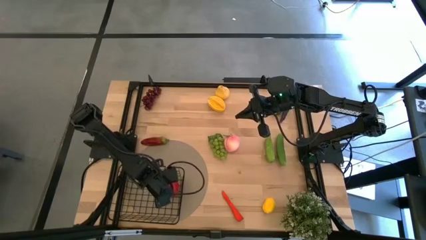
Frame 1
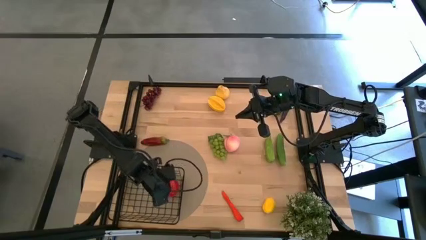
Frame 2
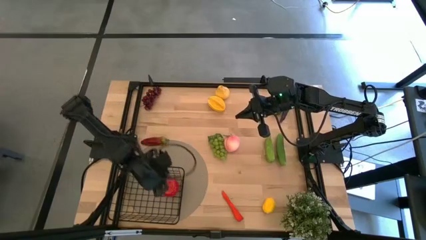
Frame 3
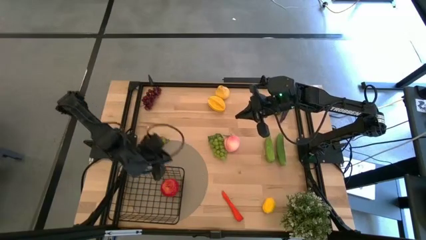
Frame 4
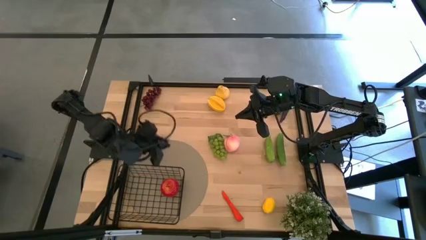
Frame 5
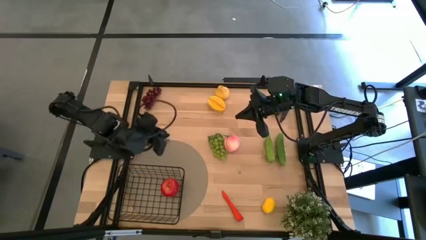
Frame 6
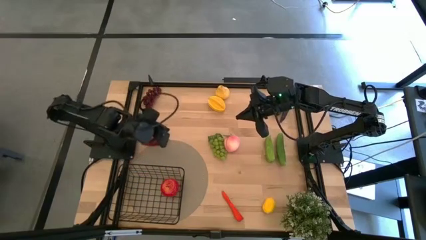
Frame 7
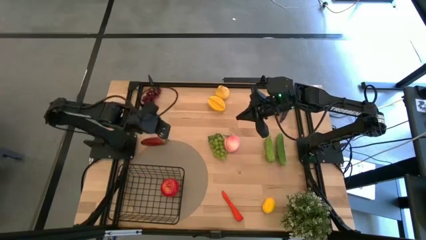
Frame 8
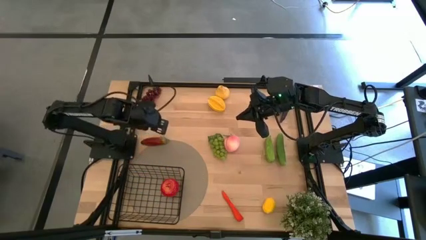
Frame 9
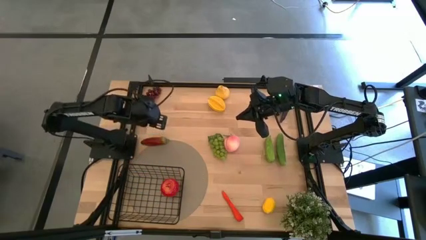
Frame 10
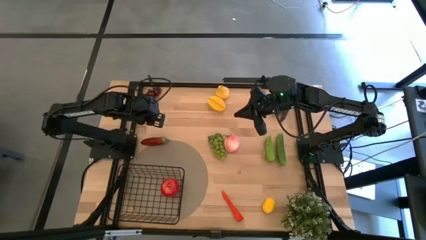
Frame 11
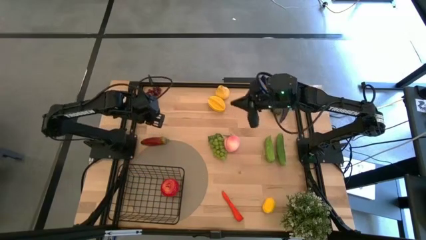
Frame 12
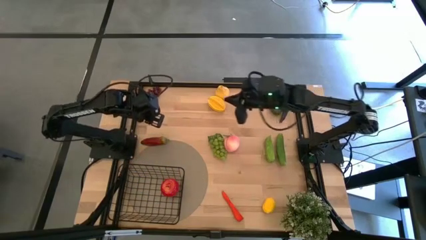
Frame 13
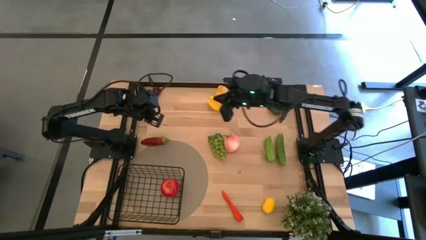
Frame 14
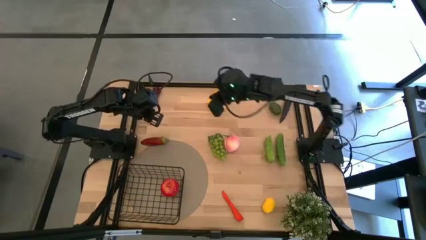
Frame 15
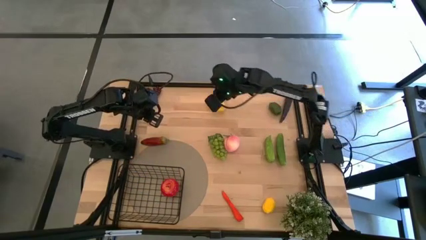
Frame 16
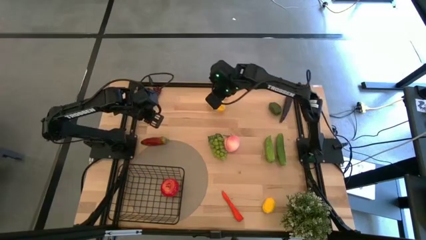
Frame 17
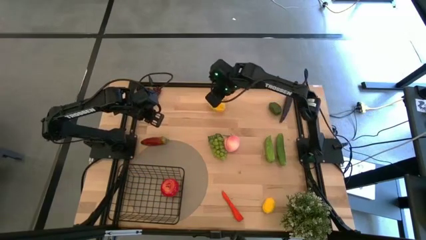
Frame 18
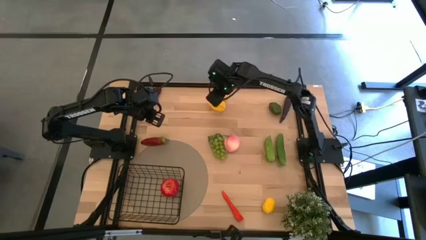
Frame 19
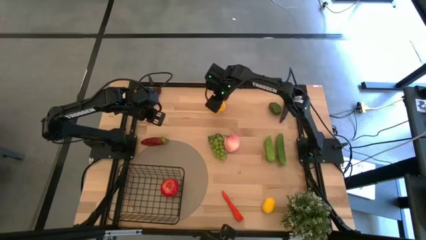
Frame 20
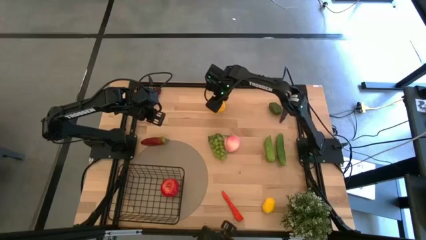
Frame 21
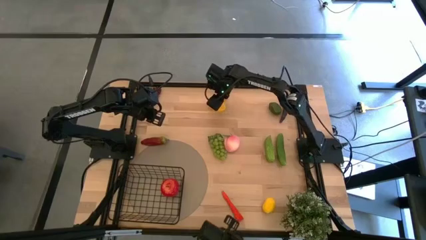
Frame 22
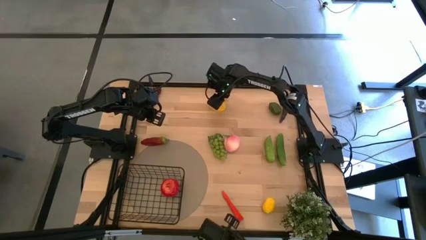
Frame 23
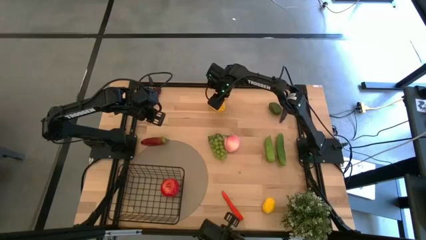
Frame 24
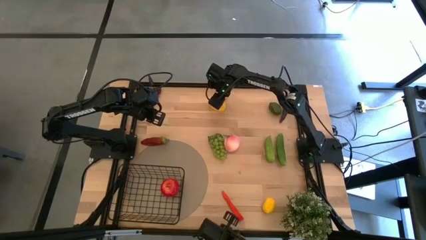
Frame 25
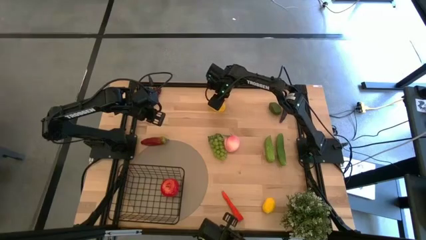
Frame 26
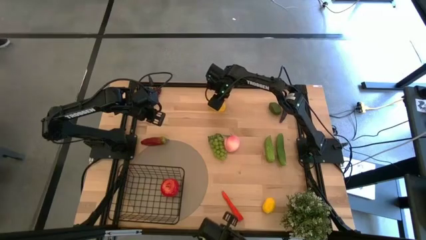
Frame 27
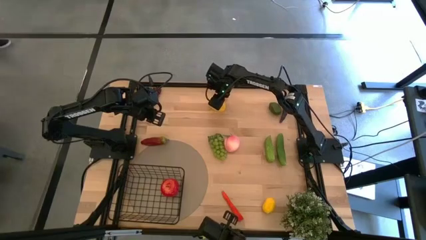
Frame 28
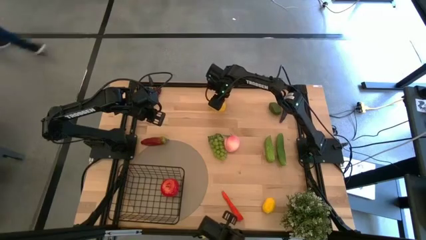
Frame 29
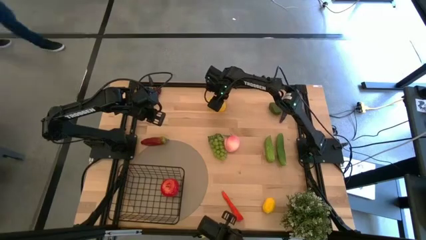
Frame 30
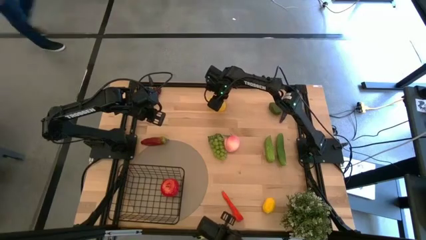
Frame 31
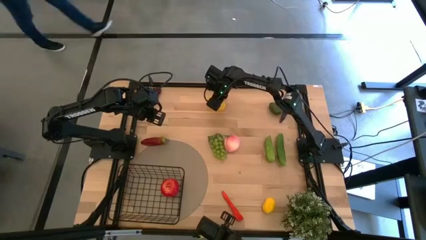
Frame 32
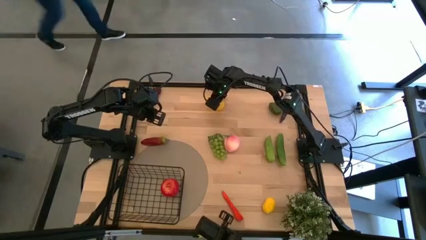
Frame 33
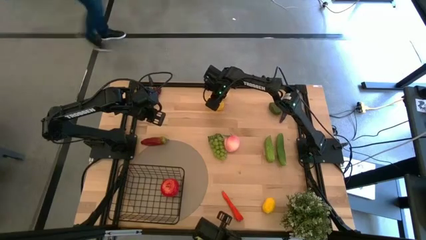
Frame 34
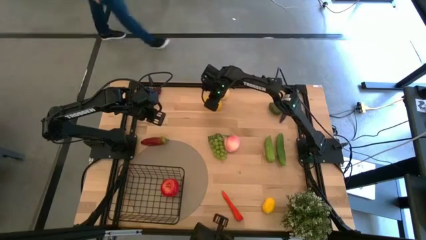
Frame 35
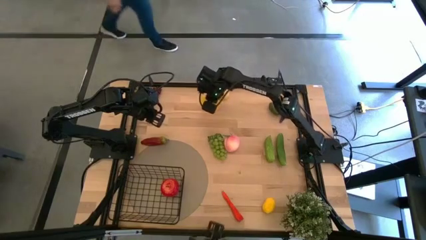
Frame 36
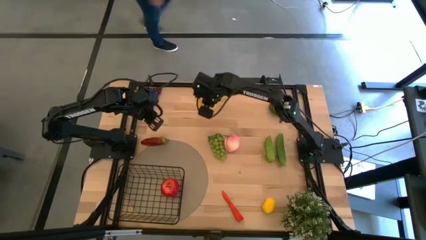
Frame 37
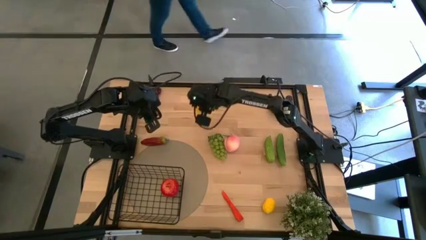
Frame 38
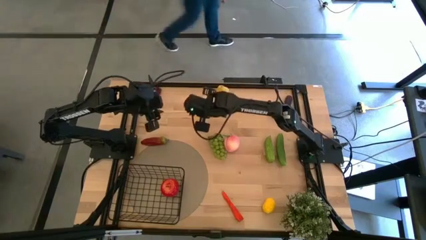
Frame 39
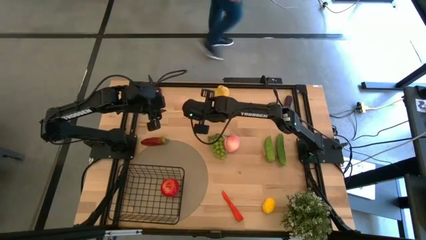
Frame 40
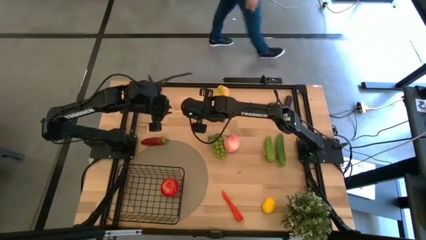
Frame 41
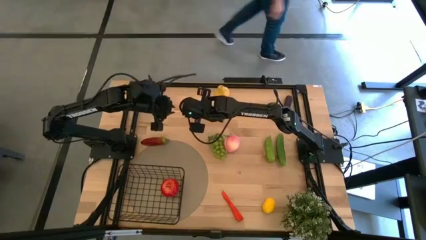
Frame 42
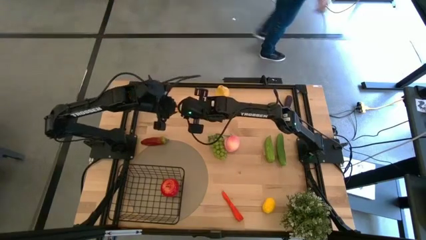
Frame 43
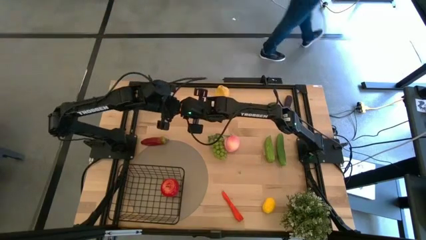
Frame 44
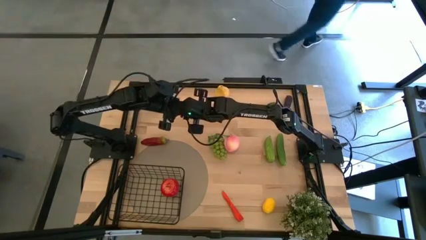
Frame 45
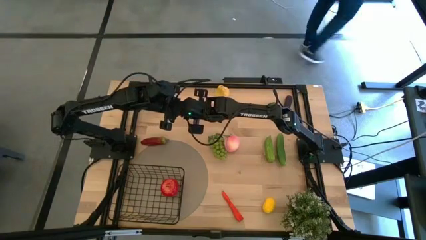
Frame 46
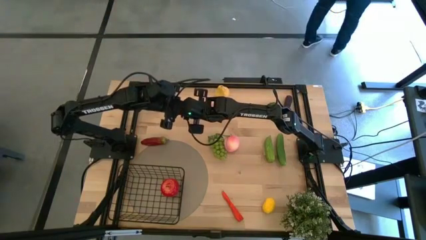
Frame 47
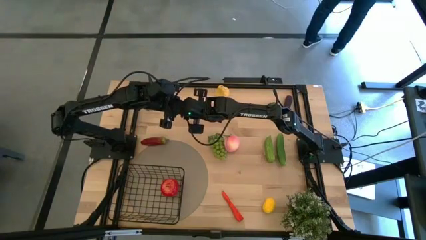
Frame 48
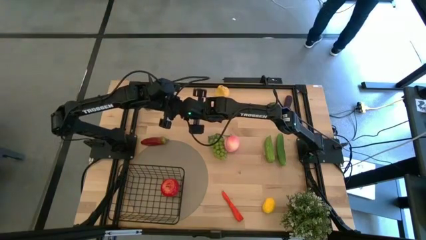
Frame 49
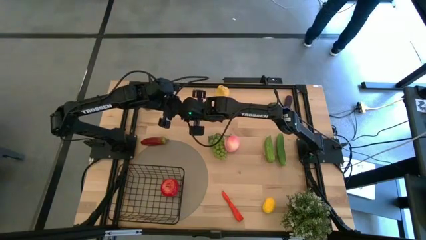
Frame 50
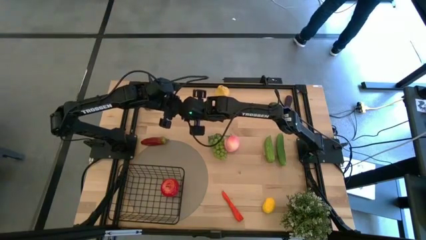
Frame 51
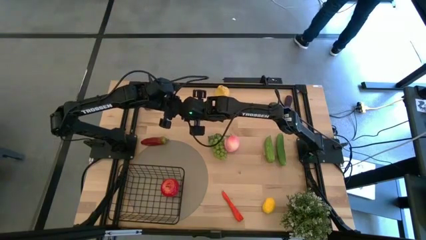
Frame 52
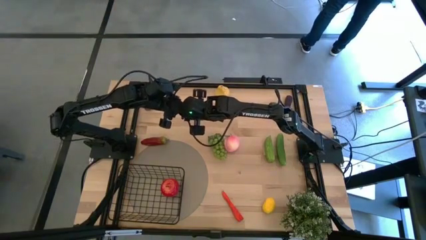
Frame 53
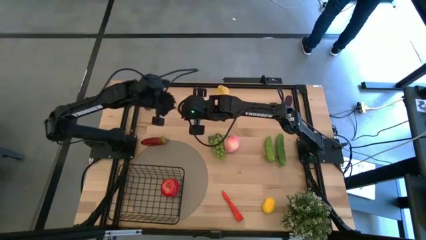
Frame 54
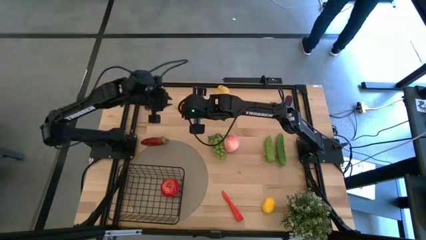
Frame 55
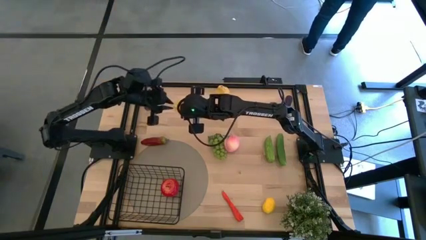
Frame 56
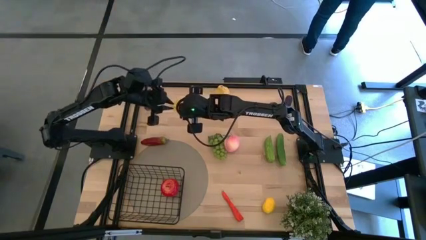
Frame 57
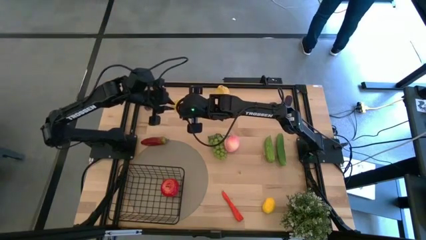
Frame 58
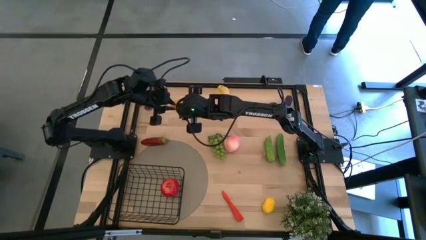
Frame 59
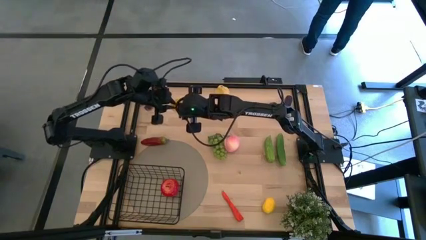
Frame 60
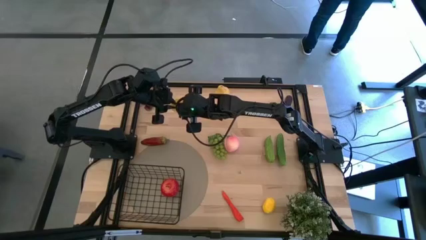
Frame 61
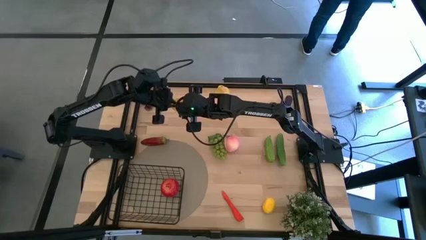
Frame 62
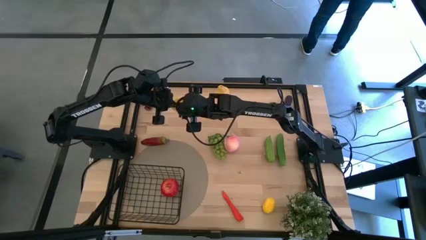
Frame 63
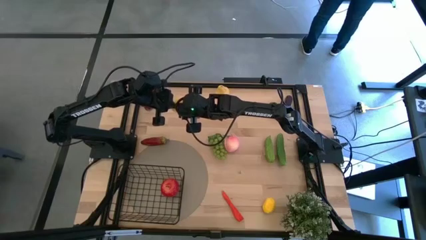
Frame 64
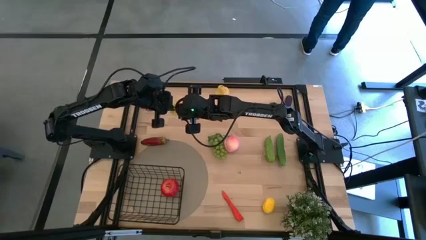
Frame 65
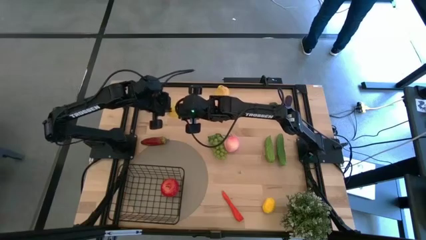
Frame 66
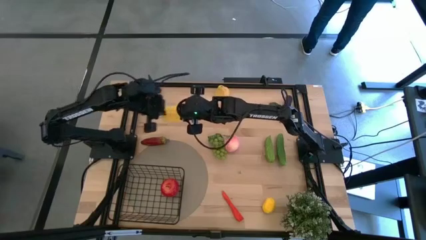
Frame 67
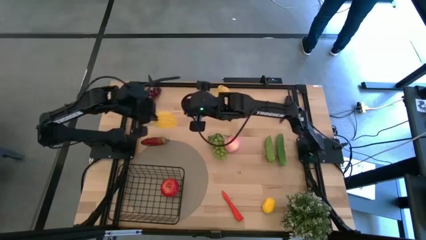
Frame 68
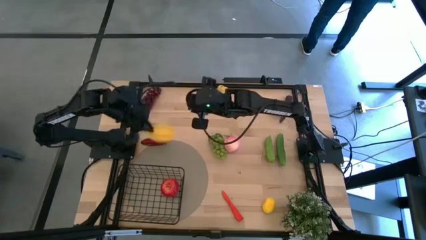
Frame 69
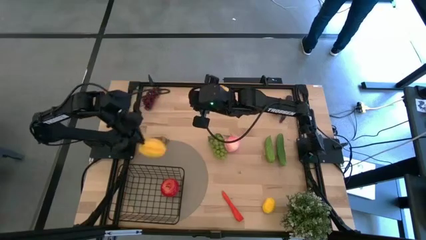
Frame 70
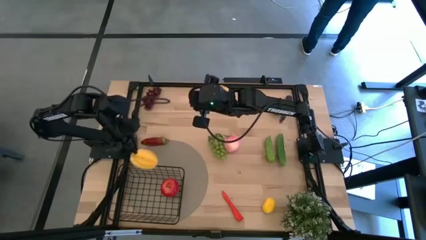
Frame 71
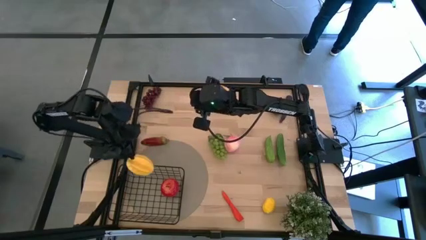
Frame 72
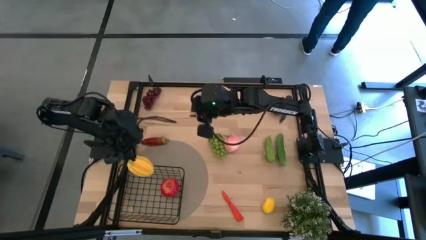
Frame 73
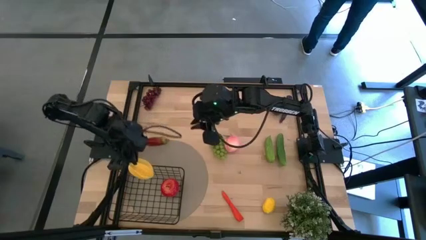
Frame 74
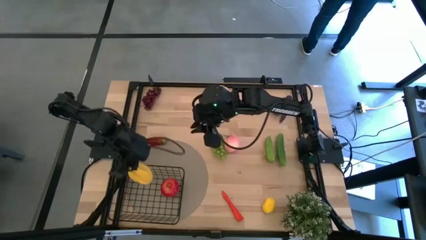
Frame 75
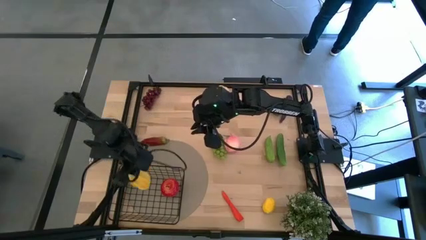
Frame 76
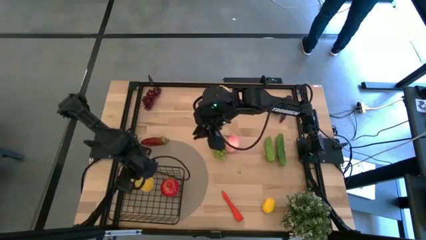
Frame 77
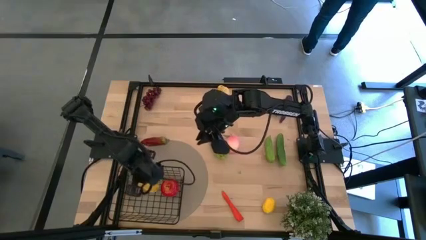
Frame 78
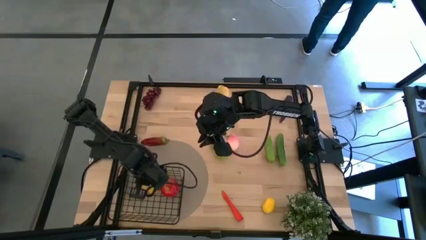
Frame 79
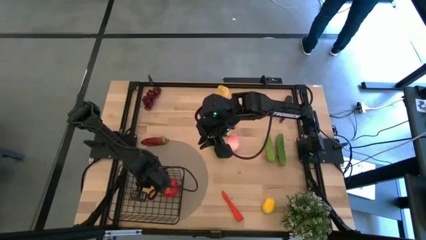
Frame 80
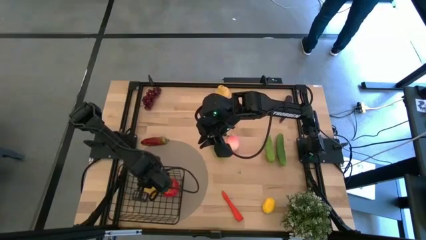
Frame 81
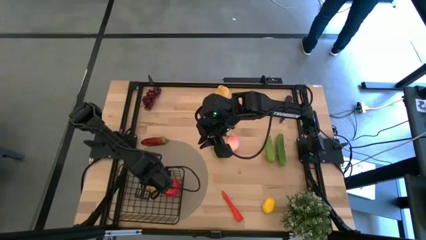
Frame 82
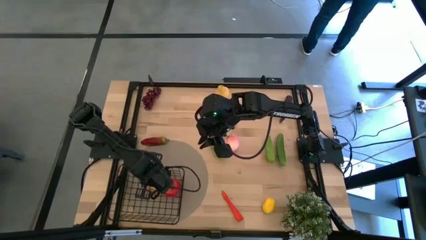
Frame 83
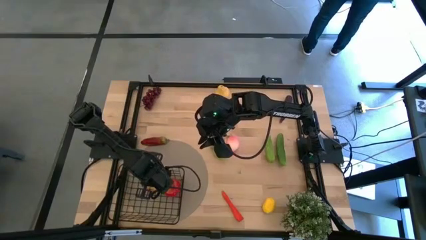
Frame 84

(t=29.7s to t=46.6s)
Task: Build produce basket
Put the yellow starfruit into the wire basket
